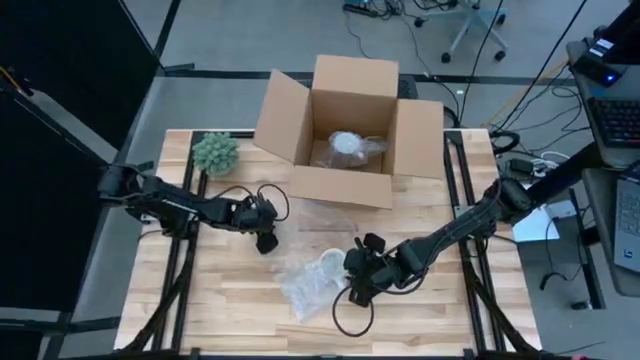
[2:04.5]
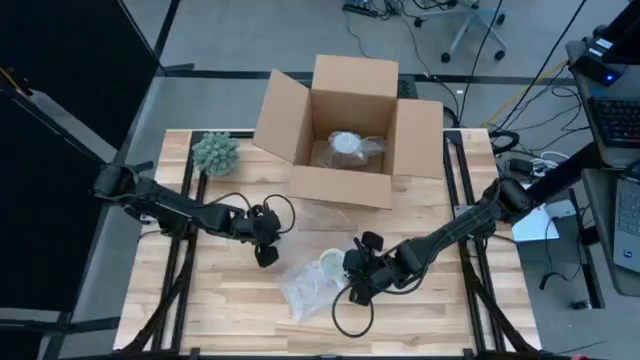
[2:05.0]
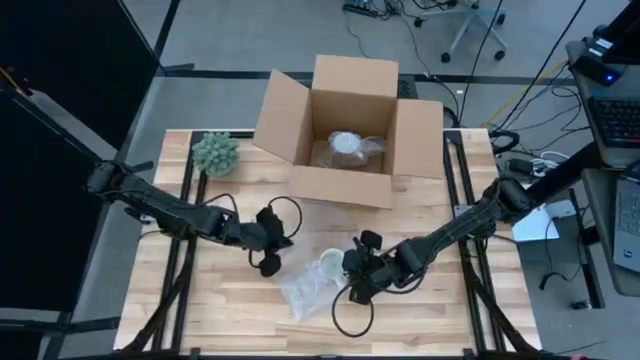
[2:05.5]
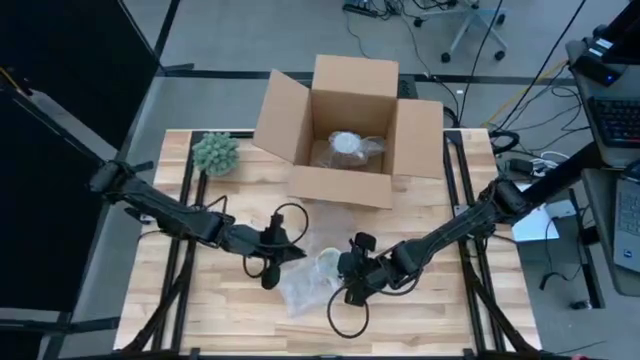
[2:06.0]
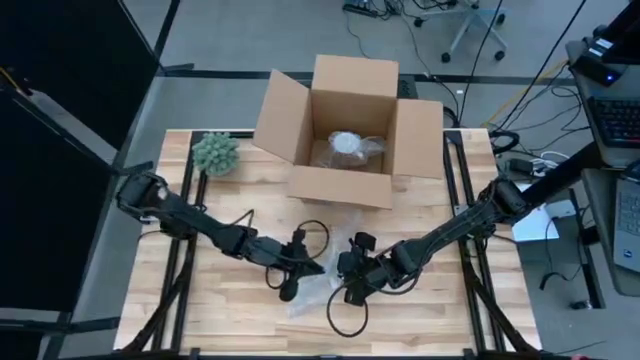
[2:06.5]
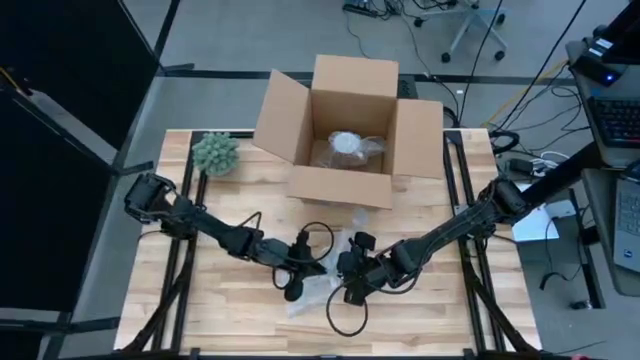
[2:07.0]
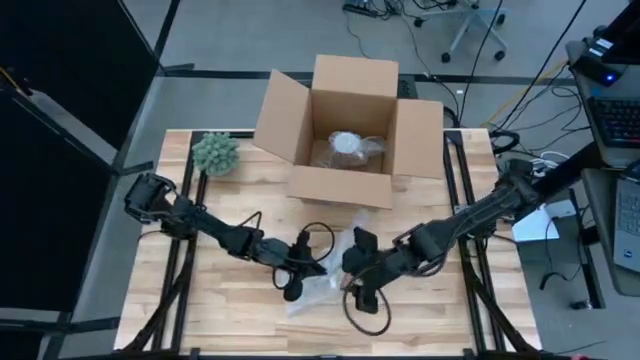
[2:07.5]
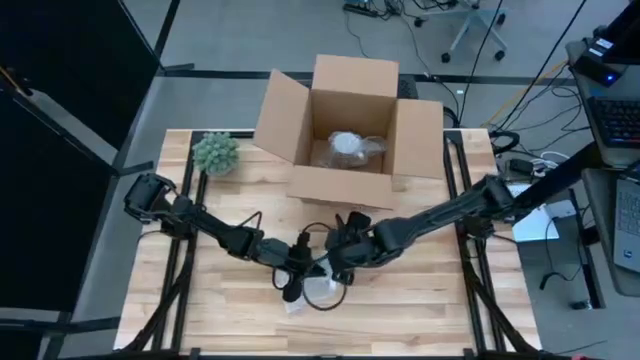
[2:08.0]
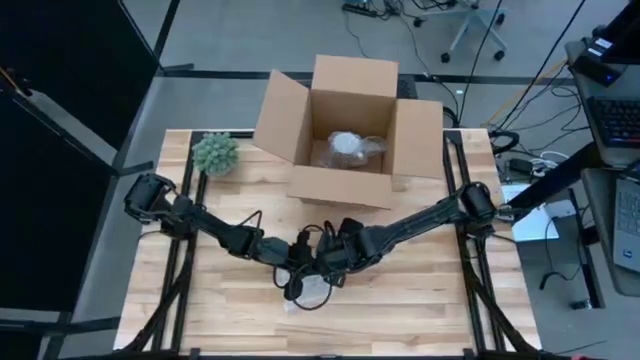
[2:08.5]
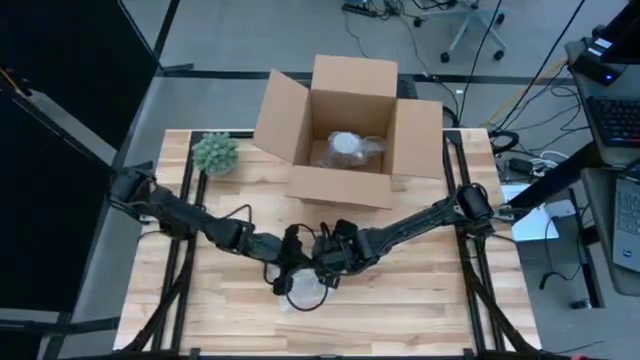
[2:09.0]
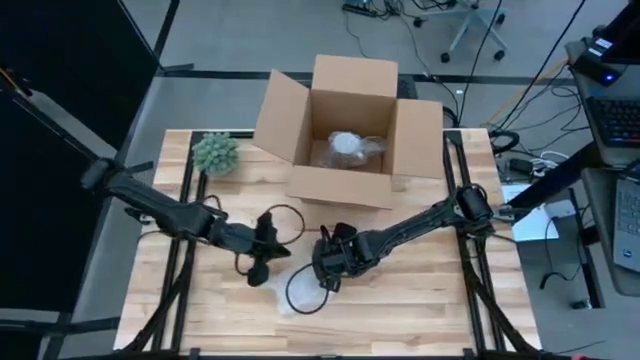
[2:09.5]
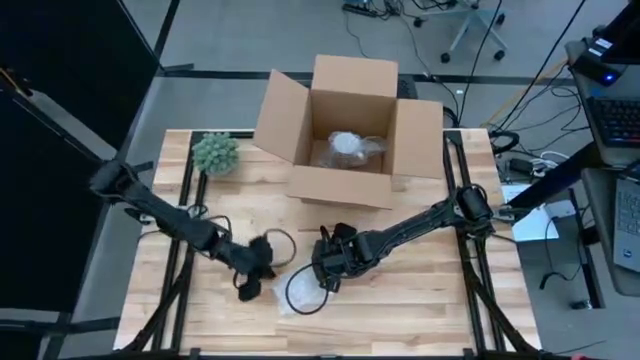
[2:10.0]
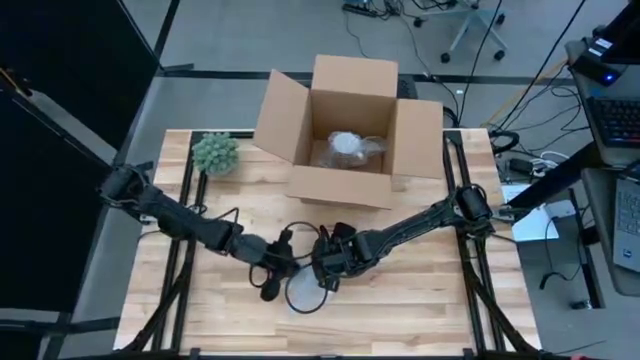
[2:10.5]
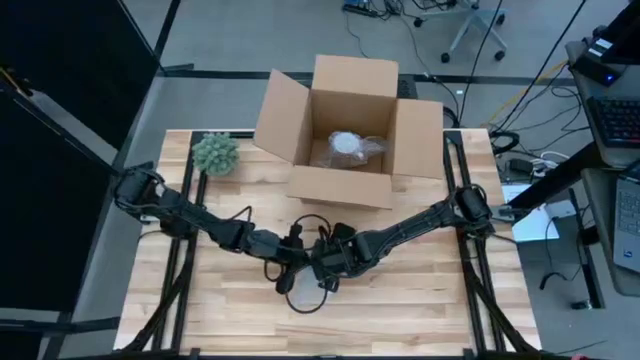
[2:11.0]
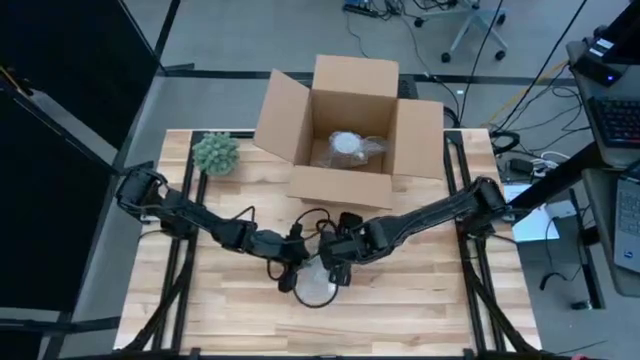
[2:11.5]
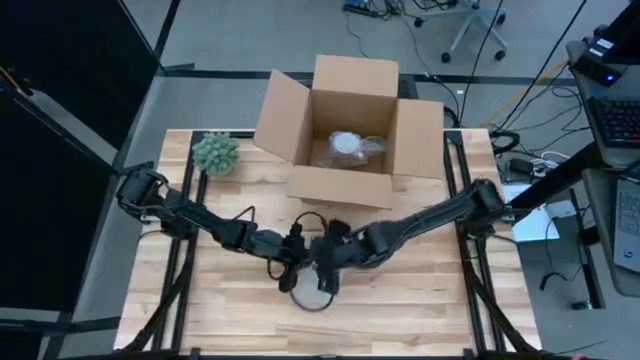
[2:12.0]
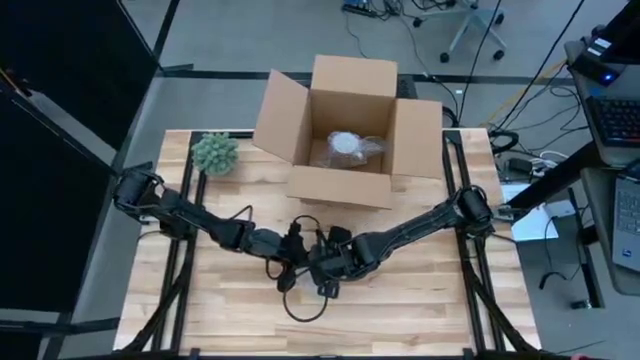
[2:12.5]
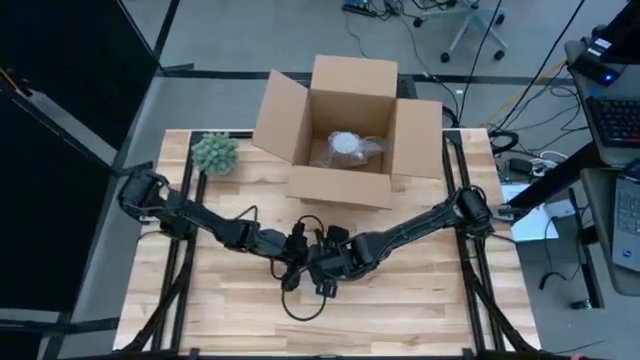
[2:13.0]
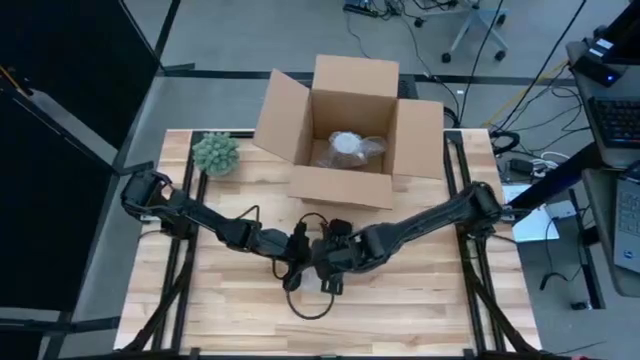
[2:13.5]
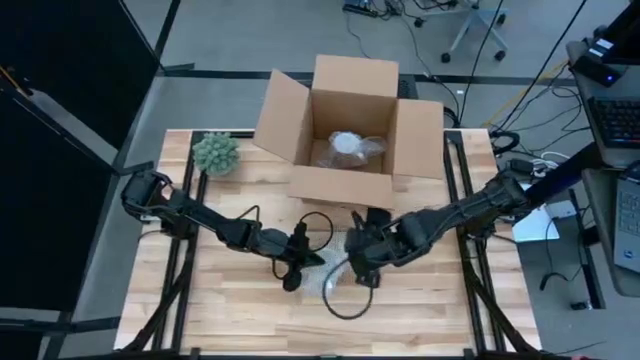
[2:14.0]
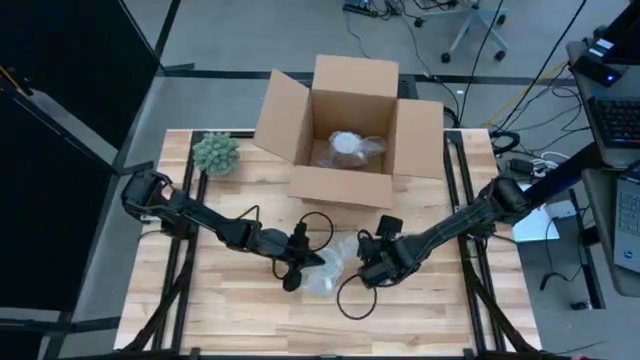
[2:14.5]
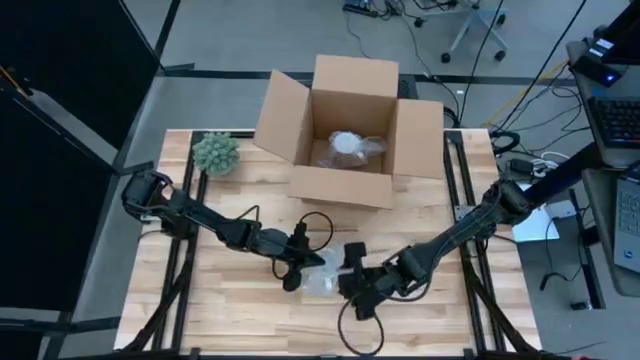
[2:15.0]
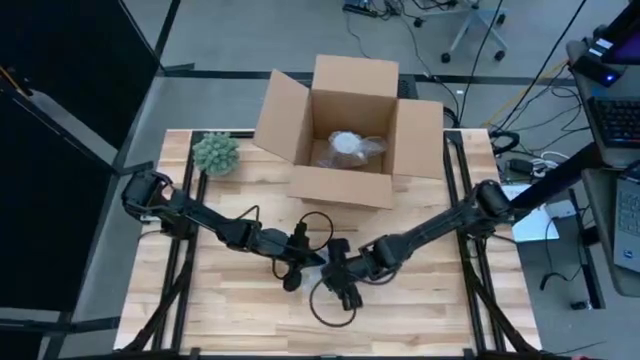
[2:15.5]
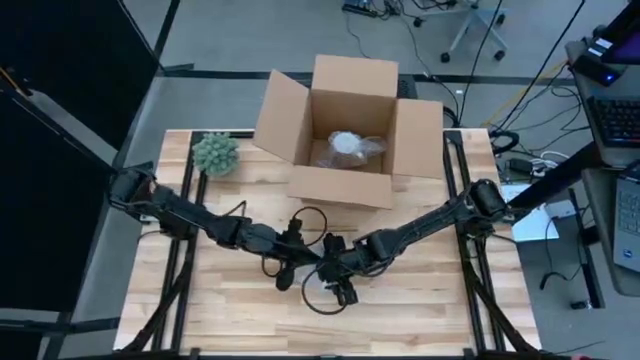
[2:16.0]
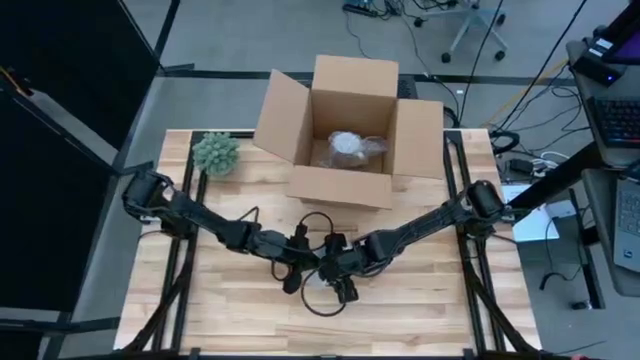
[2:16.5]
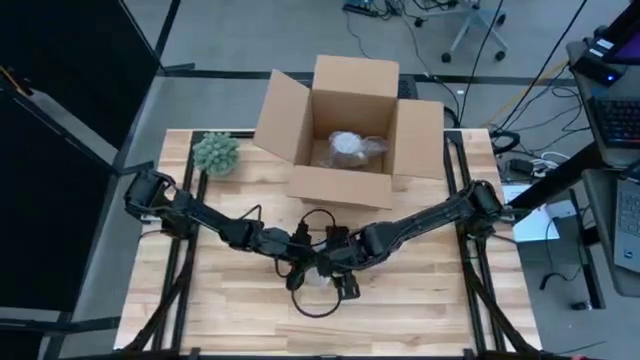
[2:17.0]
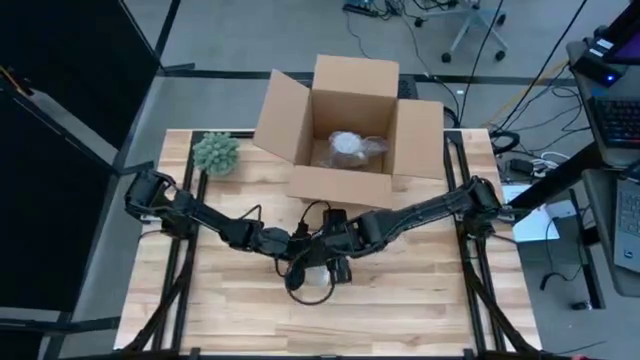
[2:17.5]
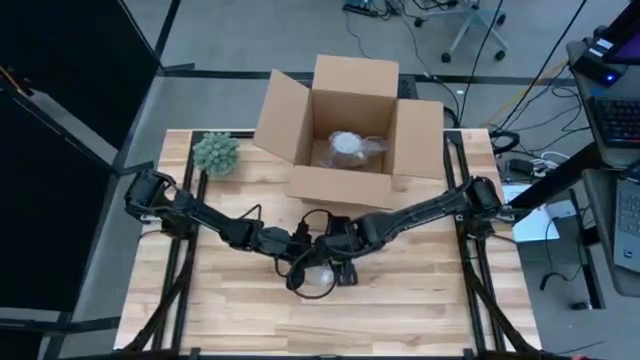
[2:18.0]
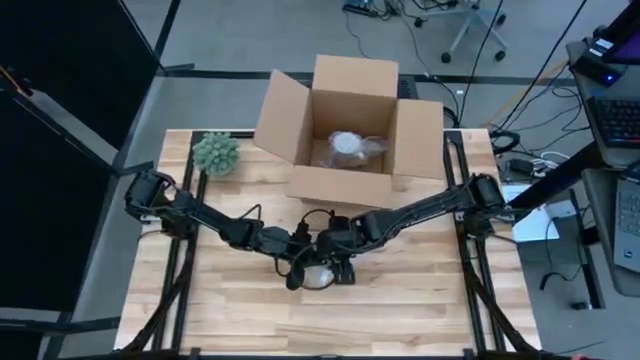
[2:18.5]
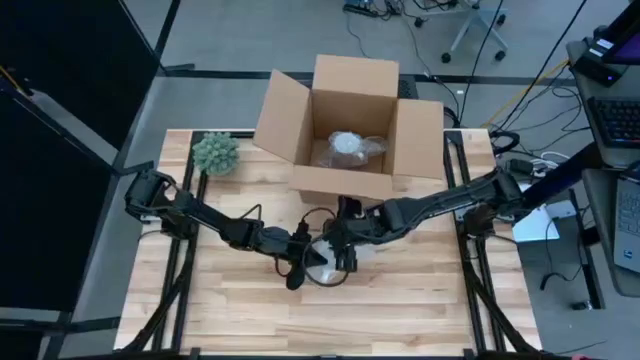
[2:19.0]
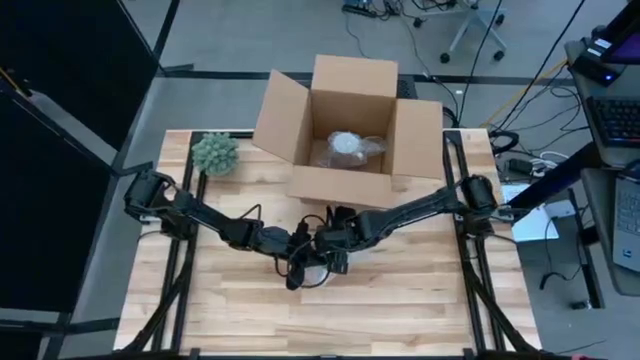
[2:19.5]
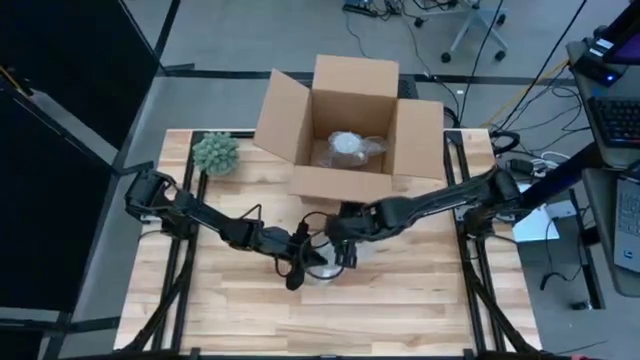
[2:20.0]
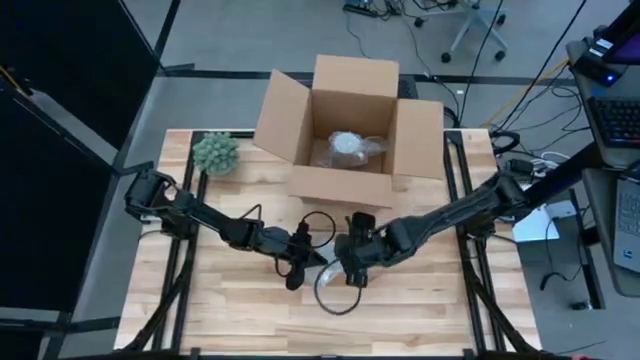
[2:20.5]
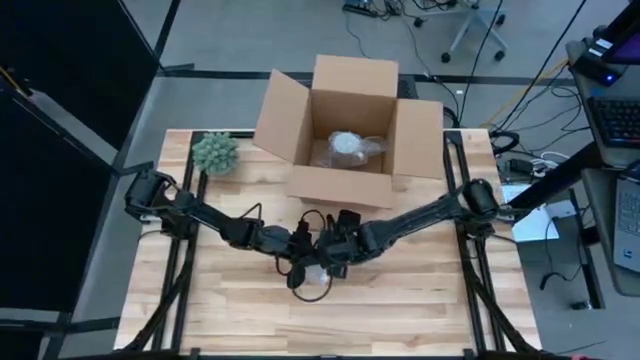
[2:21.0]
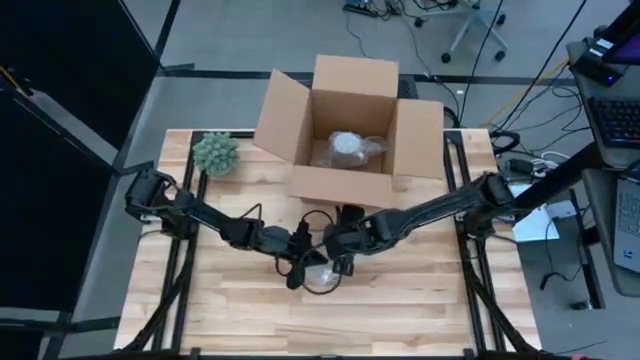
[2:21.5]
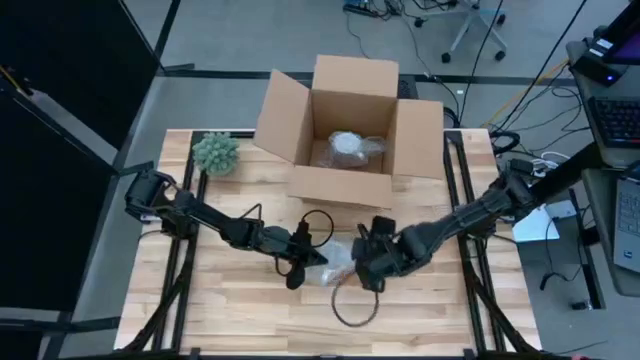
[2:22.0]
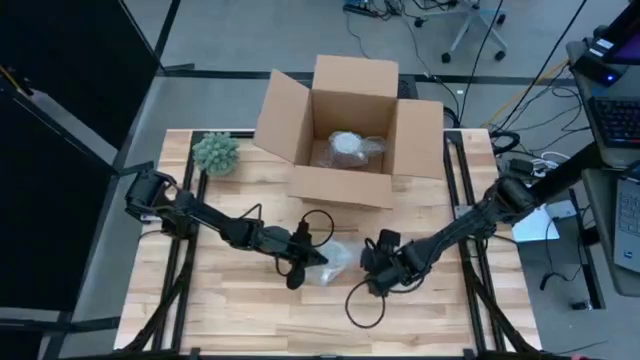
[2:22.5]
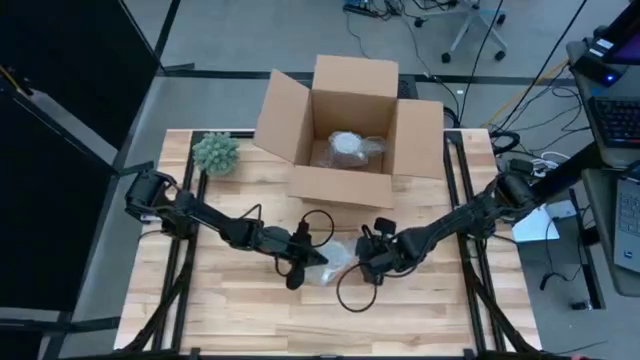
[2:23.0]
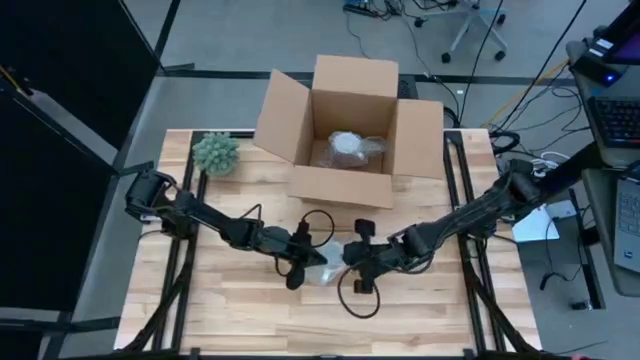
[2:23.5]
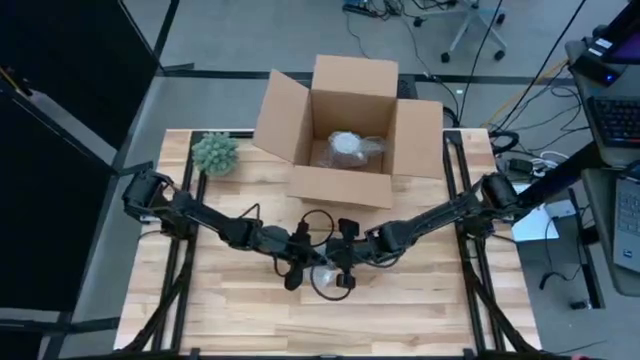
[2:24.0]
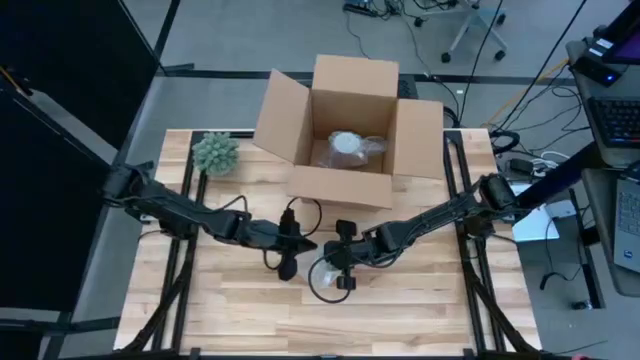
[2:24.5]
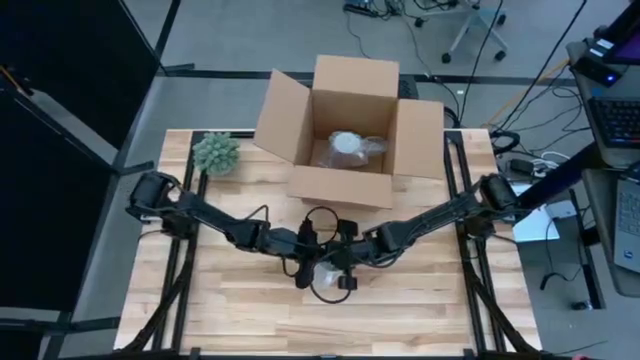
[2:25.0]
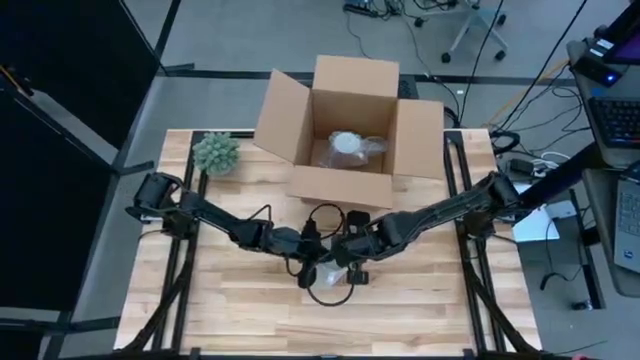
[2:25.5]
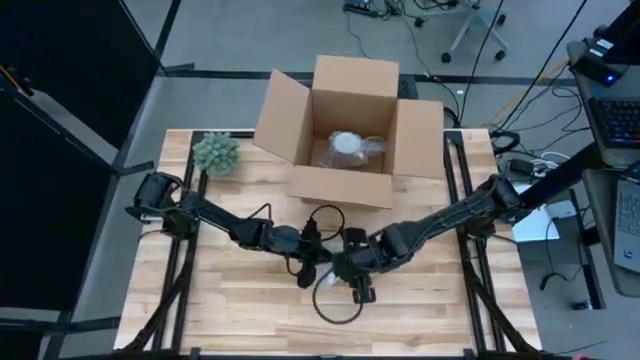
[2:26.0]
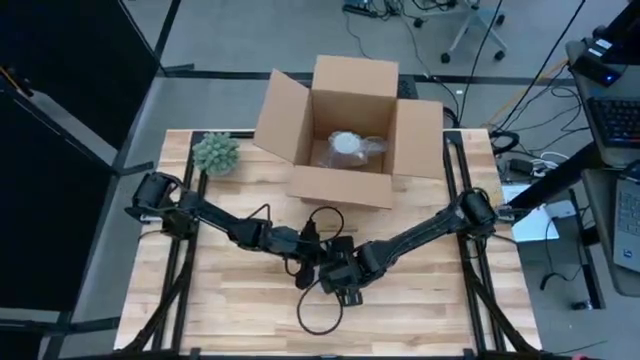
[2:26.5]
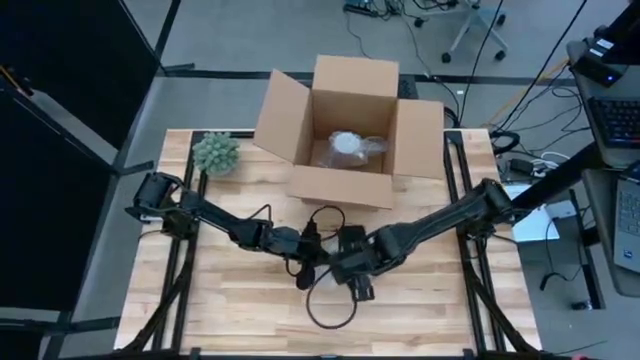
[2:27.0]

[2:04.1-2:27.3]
Task: wrap mug
Wrap the orange mug with bubble wrap
